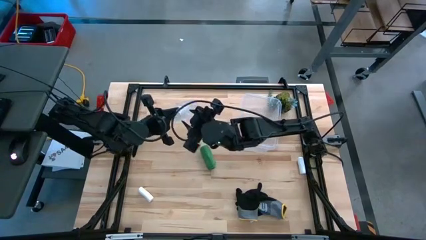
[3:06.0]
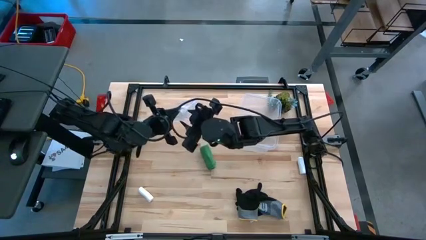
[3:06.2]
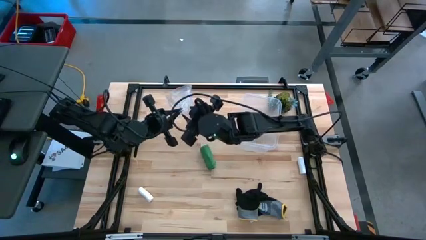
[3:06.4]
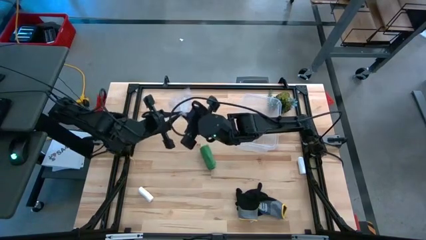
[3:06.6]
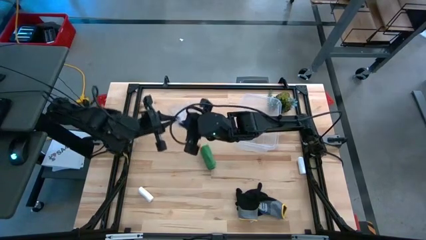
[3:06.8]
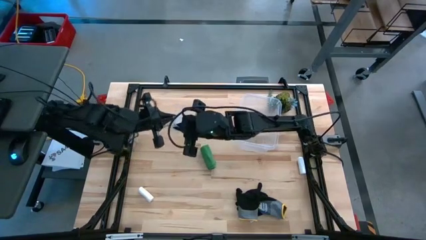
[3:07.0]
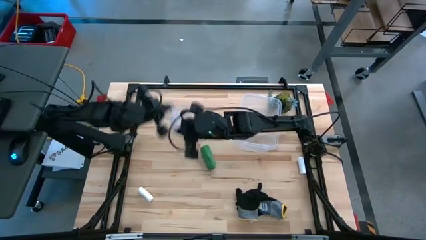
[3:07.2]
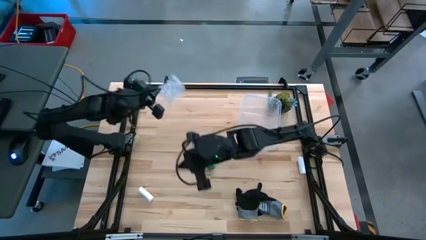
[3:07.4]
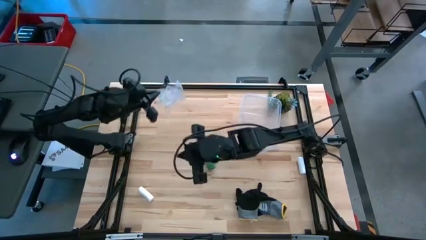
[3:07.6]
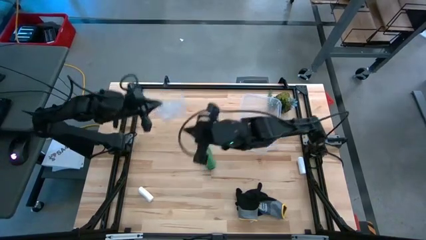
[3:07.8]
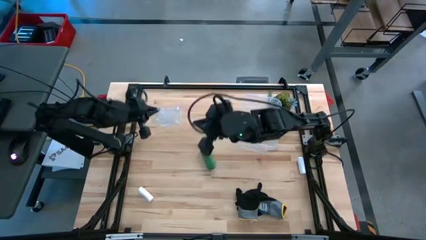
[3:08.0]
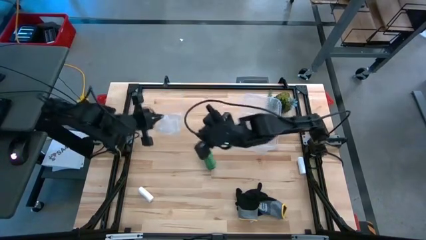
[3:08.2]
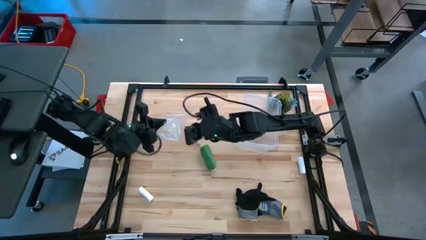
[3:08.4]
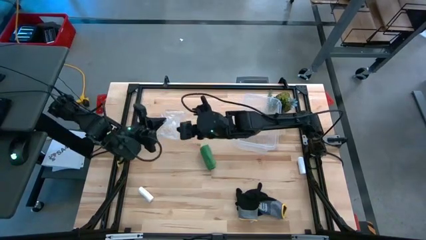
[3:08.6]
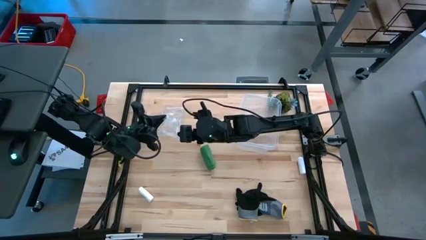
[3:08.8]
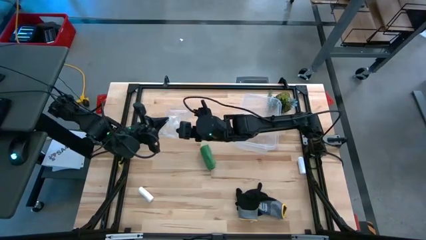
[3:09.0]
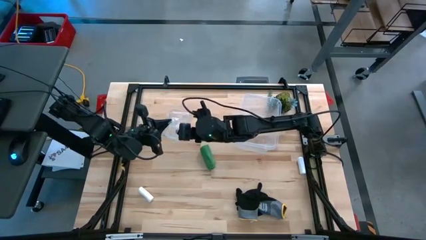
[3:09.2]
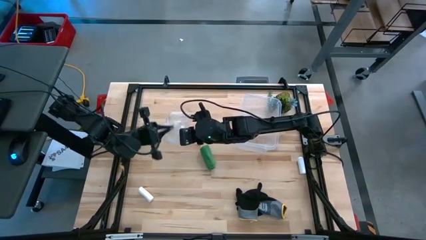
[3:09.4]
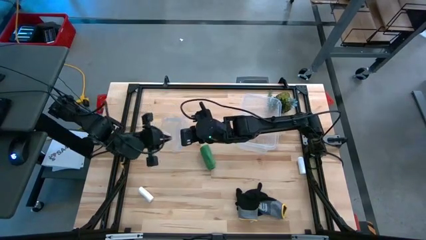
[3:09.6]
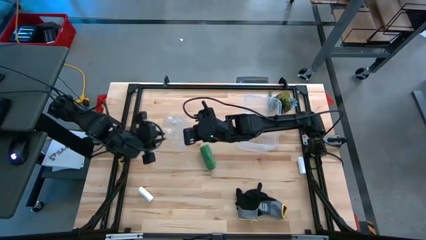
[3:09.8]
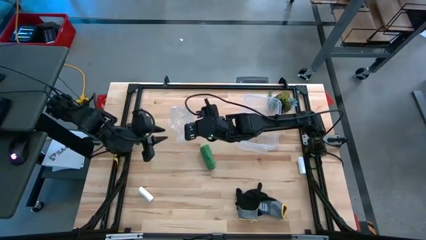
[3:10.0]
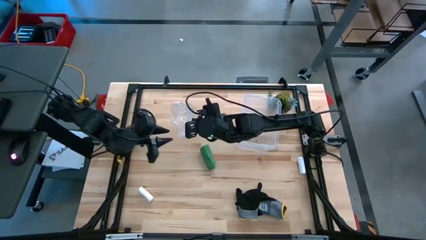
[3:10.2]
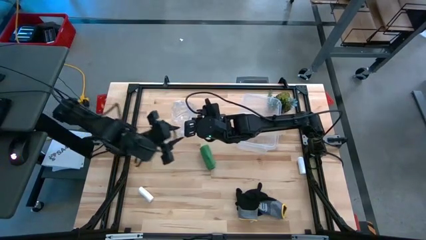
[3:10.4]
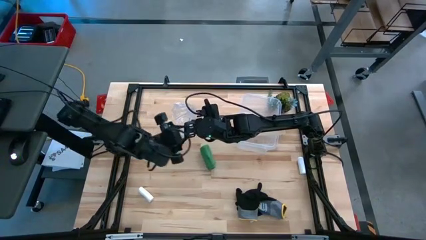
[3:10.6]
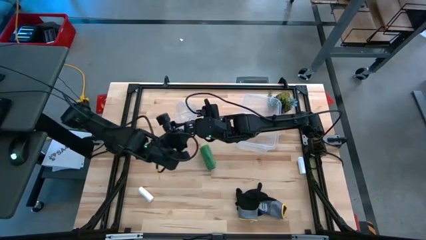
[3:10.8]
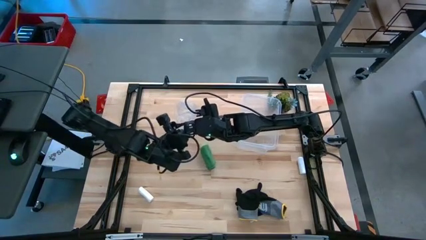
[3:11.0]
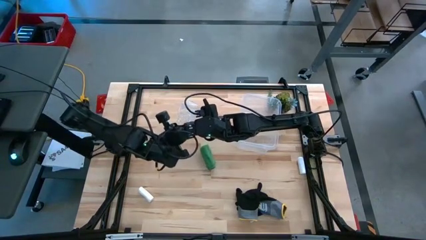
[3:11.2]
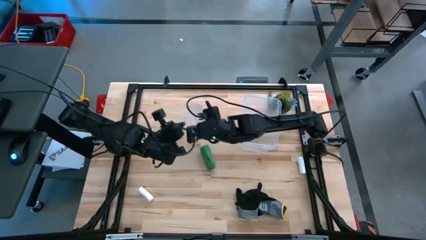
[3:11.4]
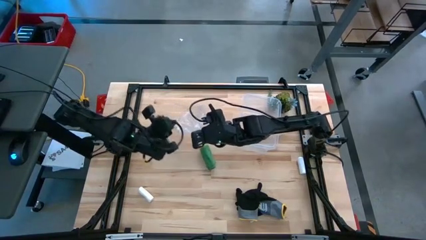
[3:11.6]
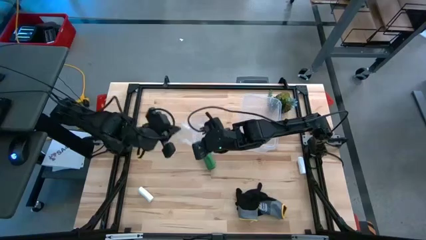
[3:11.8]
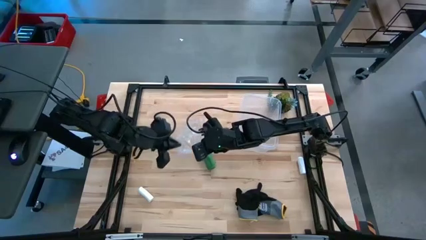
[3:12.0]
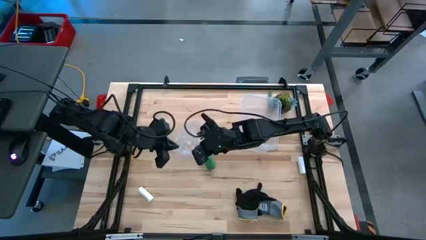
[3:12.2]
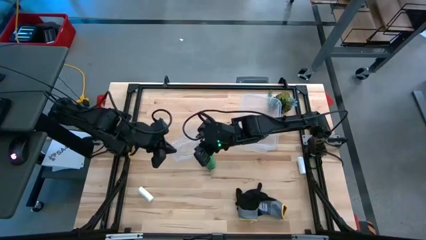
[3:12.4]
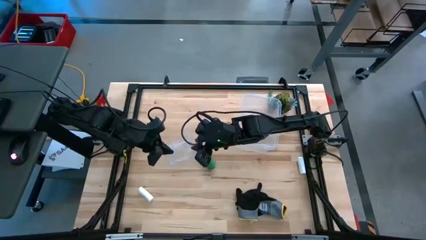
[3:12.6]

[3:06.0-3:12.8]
Task: Roll bandage
Open the transparent zip bag

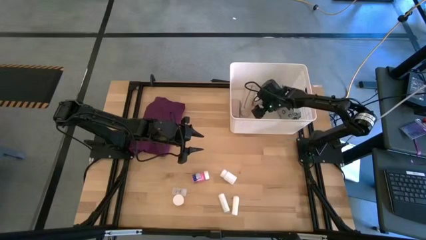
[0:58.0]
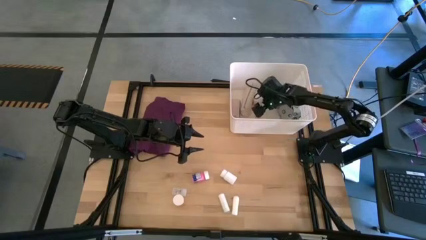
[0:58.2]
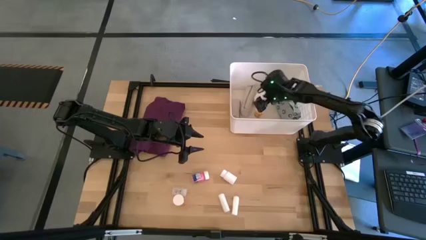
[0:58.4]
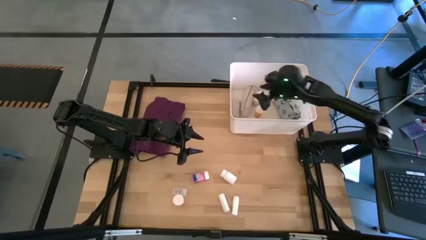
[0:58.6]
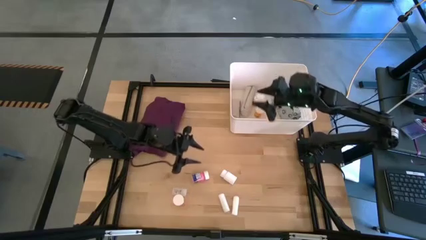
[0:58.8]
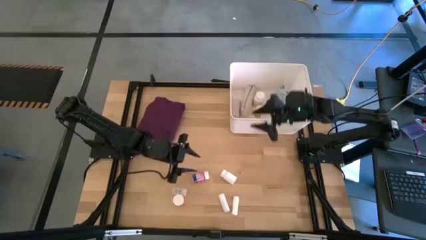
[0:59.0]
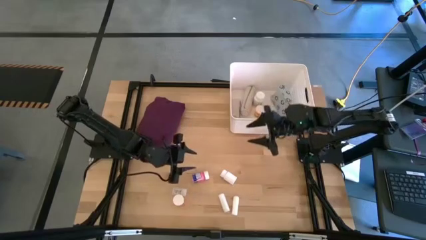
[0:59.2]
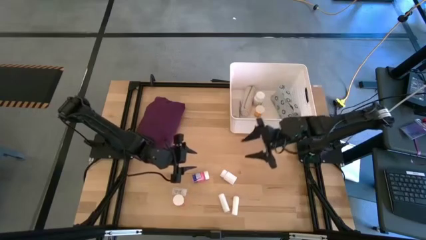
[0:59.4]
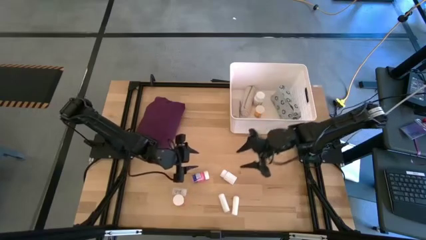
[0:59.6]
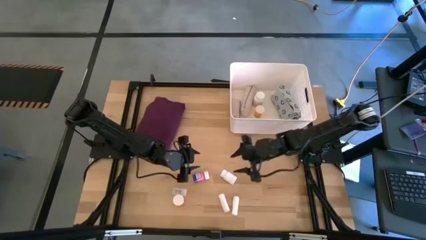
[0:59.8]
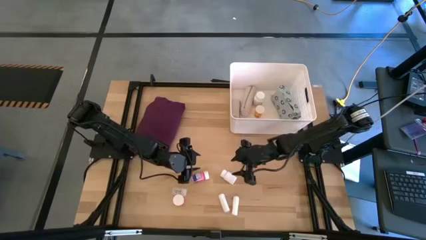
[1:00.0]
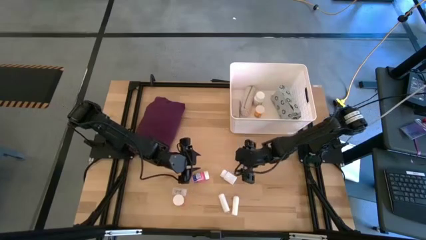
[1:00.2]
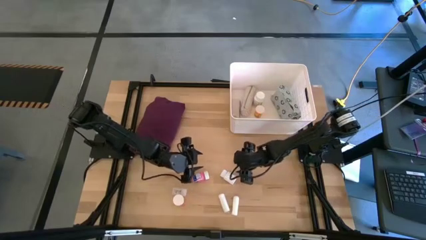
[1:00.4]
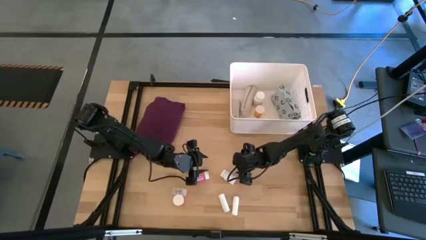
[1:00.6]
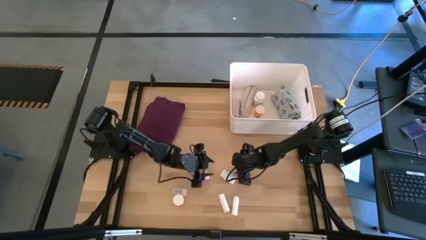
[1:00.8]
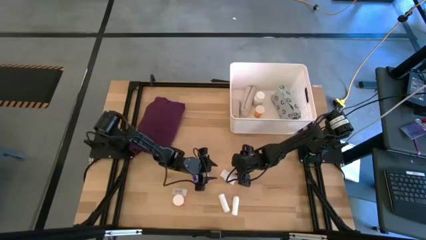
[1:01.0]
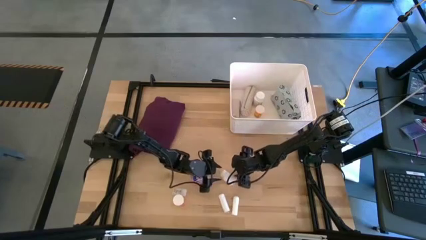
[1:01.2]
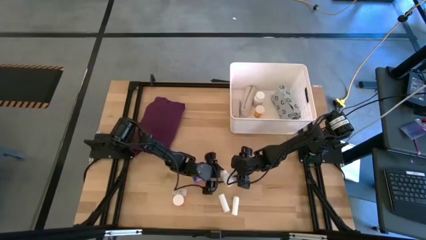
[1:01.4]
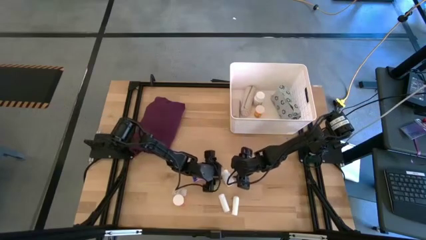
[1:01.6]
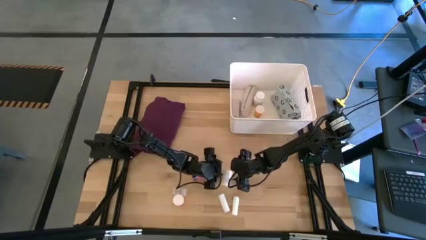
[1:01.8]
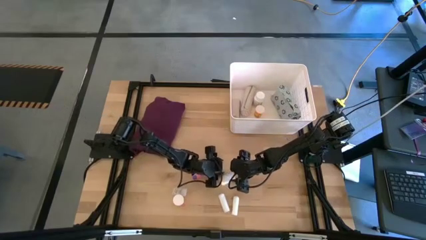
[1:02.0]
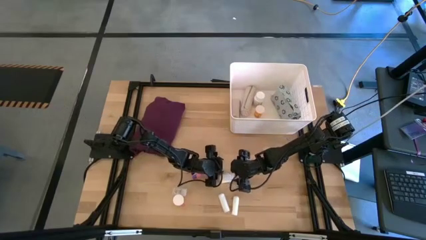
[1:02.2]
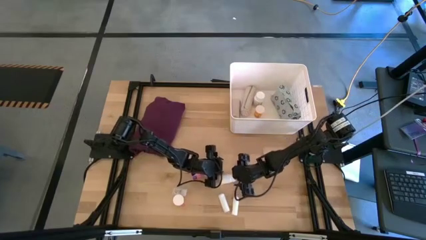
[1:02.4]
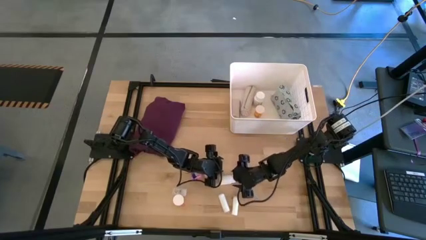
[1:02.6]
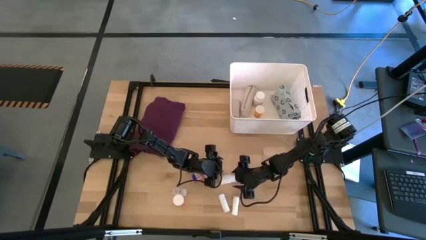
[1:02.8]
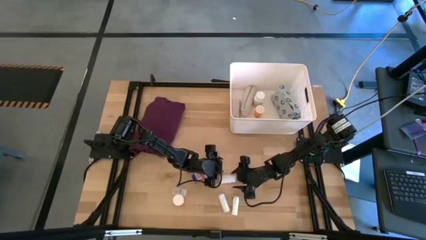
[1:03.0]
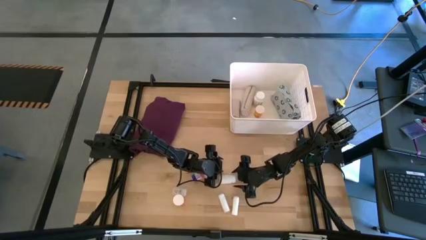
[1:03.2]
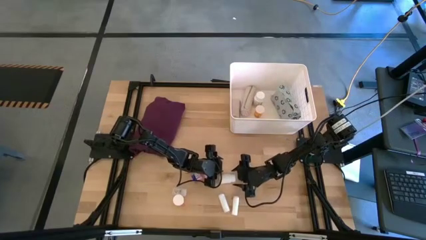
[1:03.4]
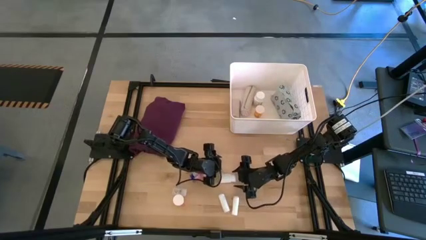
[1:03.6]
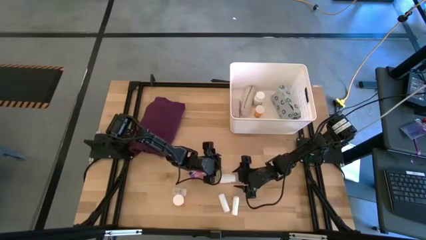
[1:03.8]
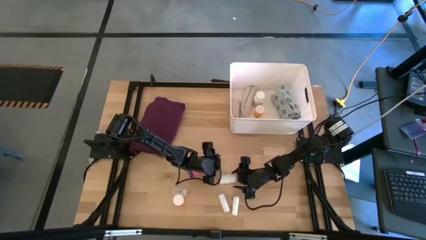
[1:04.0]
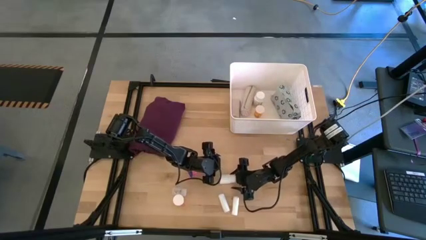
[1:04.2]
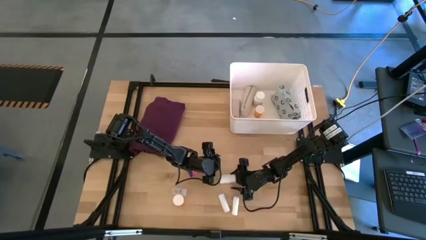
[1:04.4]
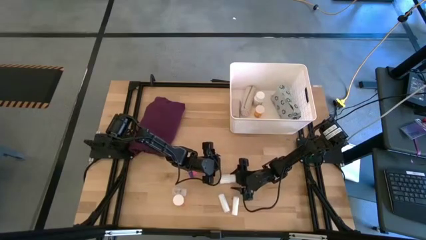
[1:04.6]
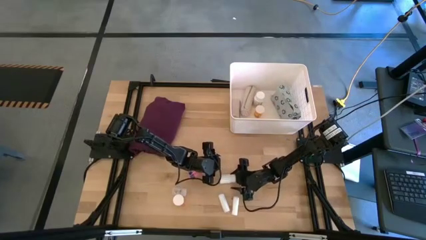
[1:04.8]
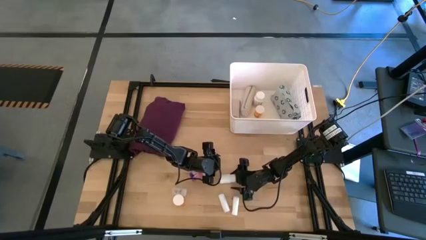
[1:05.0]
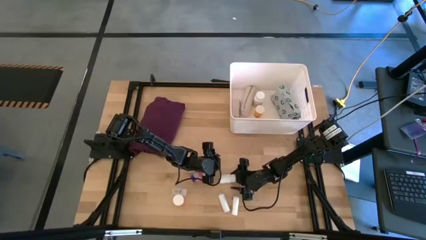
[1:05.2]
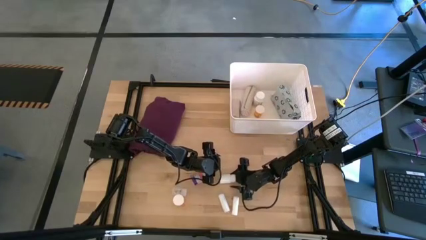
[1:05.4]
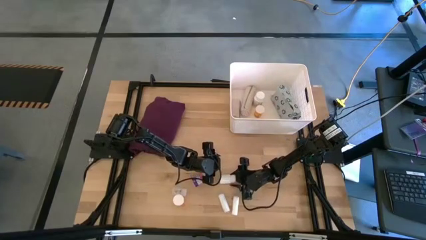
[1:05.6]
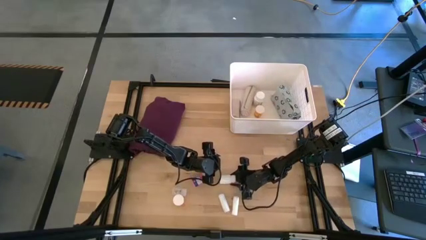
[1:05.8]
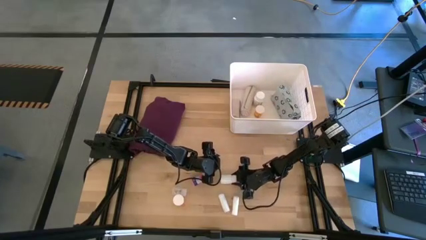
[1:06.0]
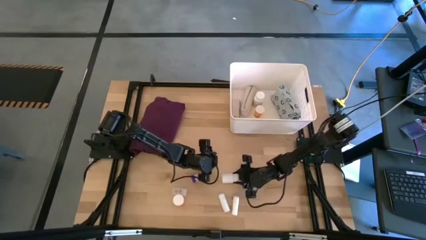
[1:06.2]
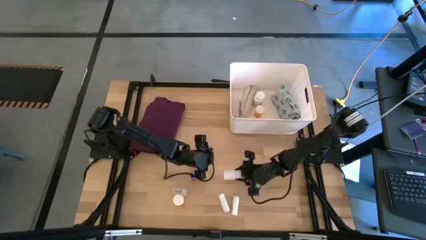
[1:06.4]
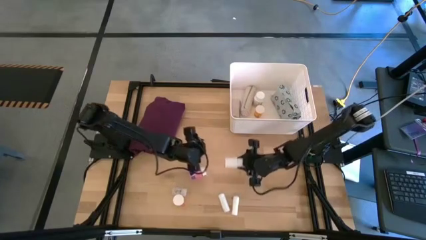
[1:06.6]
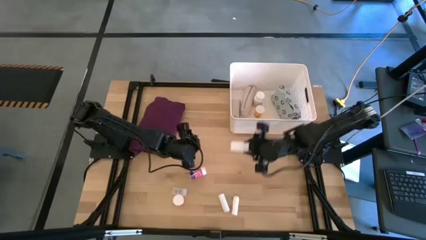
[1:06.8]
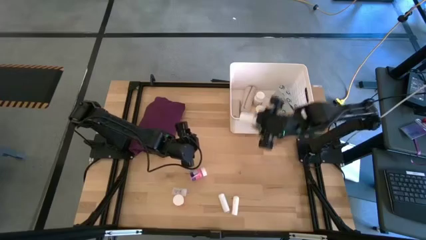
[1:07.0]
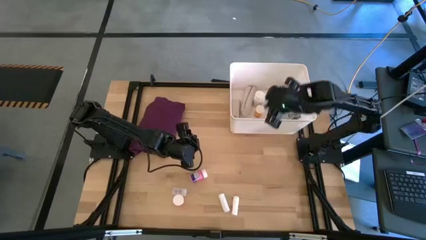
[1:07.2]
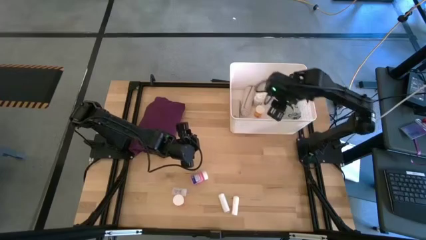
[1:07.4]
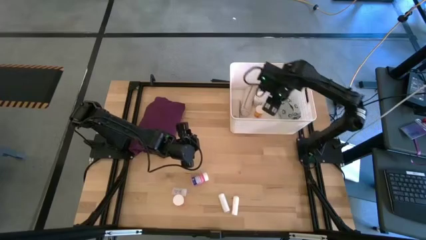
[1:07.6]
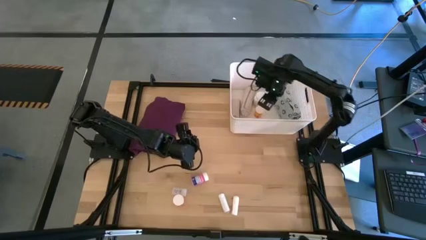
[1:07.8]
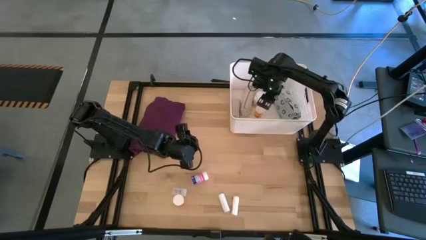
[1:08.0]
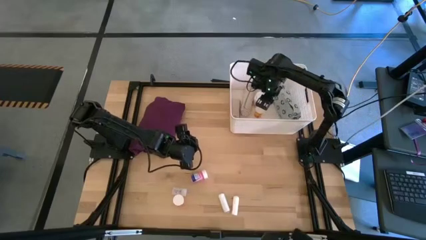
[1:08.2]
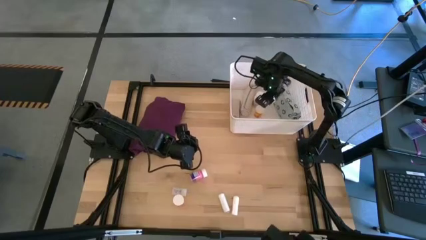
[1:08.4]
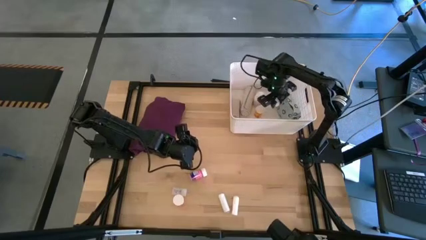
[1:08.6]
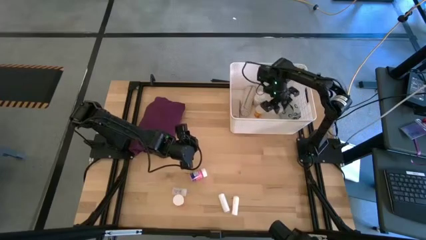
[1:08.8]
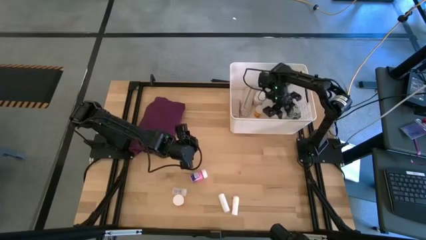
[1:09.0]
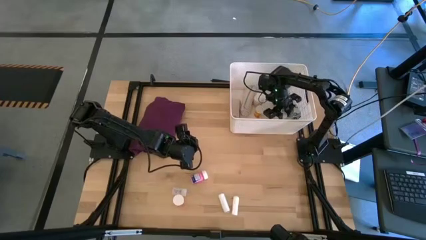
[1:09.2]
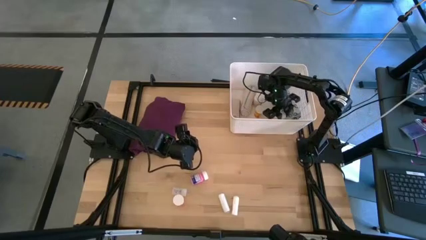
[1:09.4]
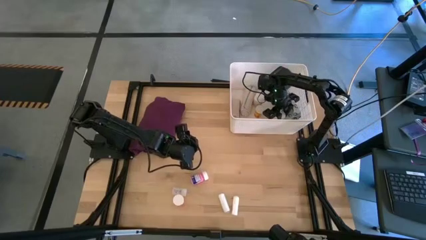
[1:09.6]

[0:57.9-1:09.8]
Task: Pick & place medical supplies in basket/bin
Put the white pill bottle into the white bin
